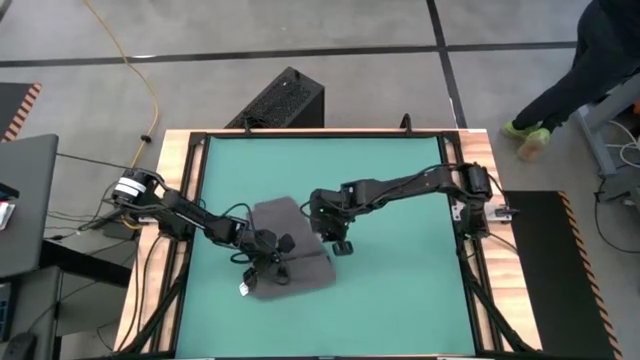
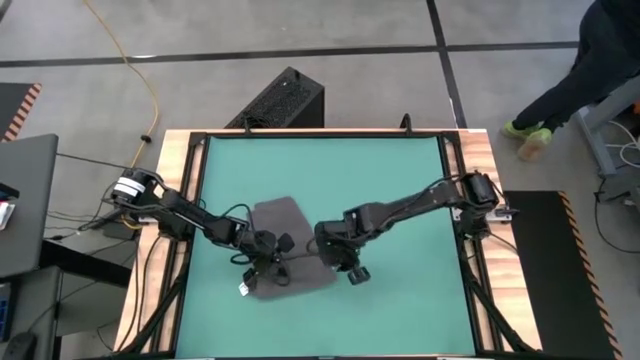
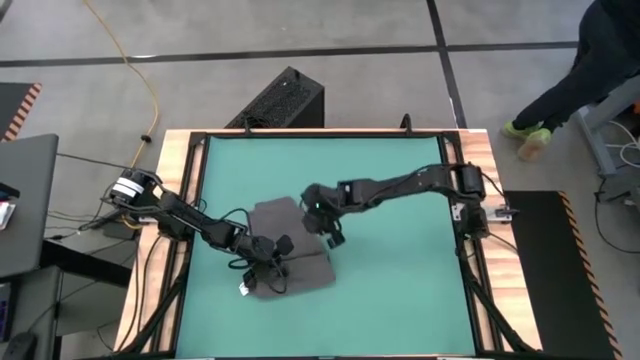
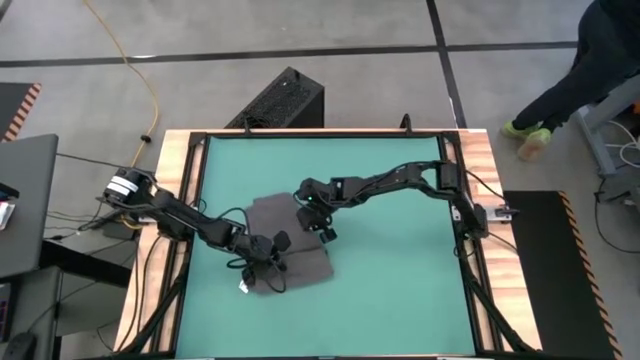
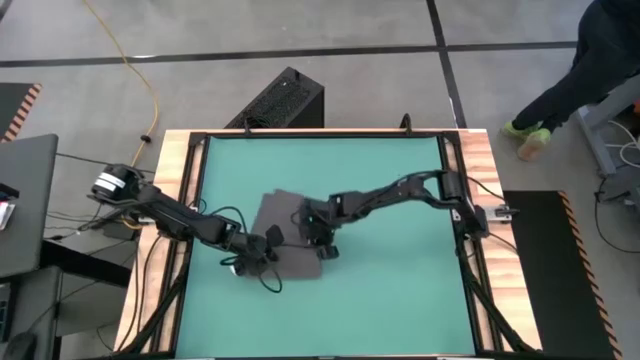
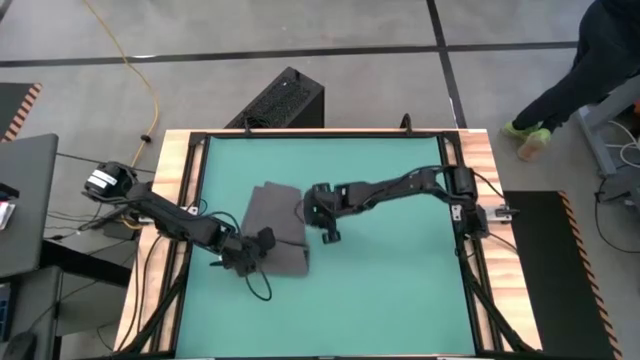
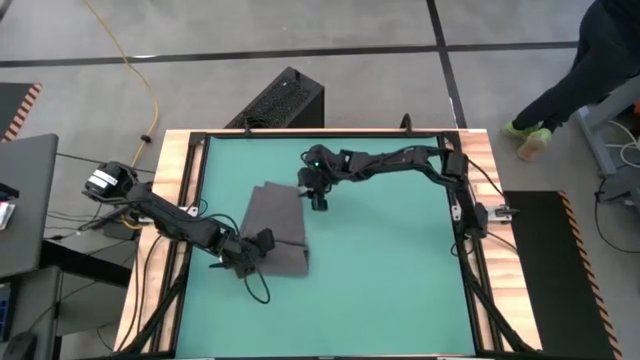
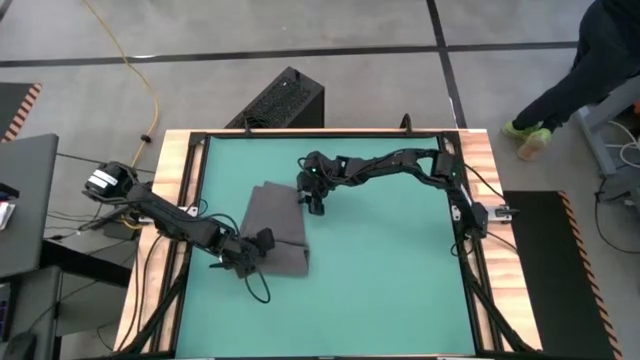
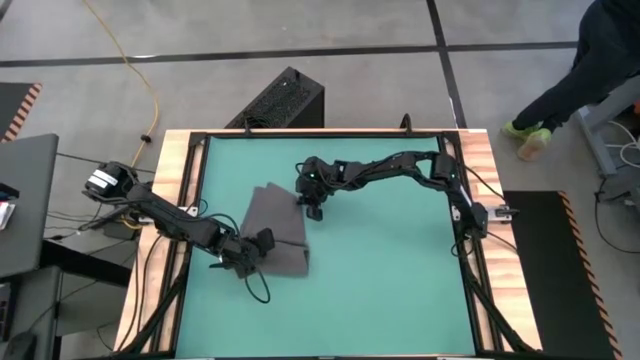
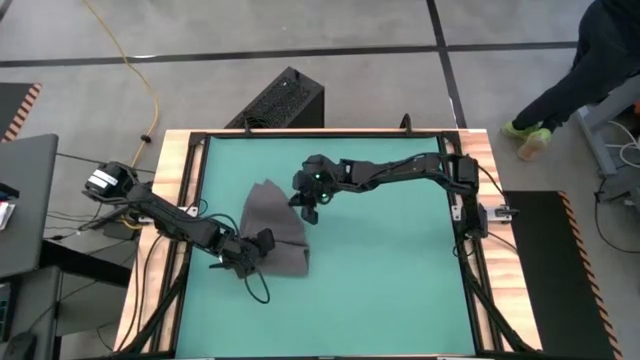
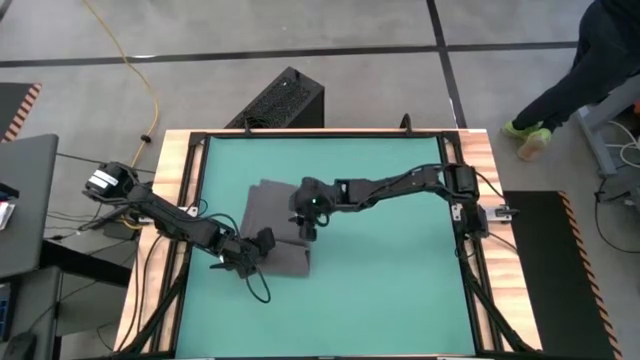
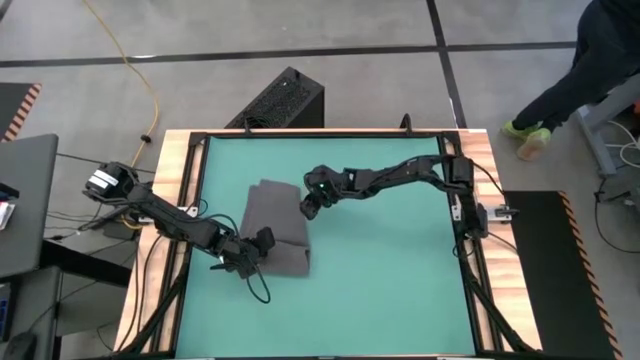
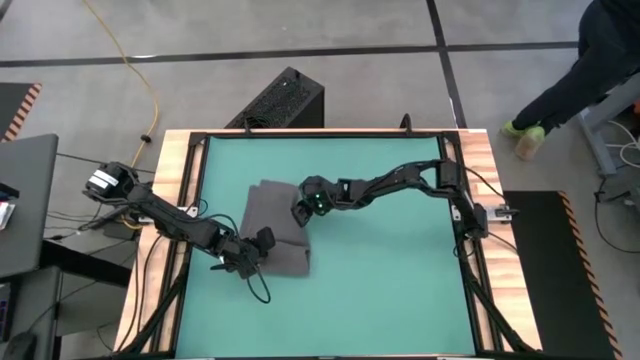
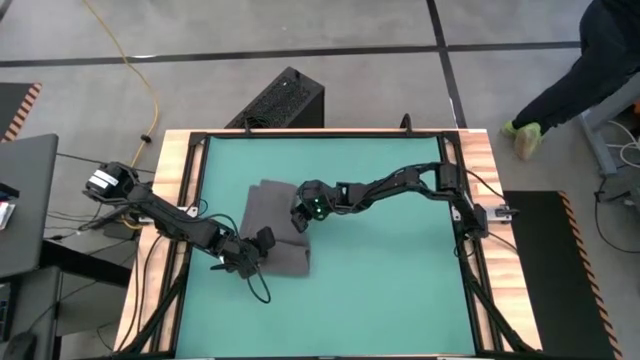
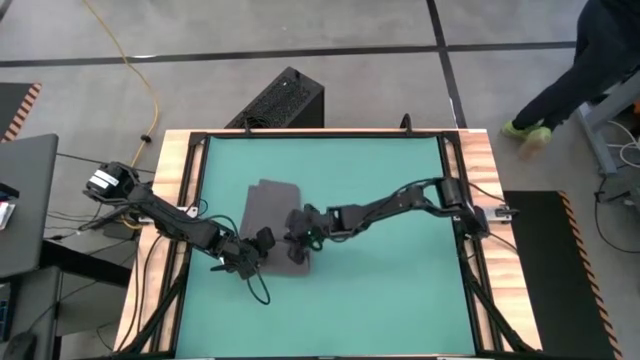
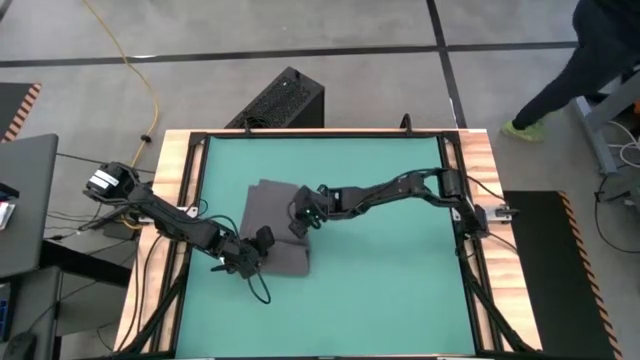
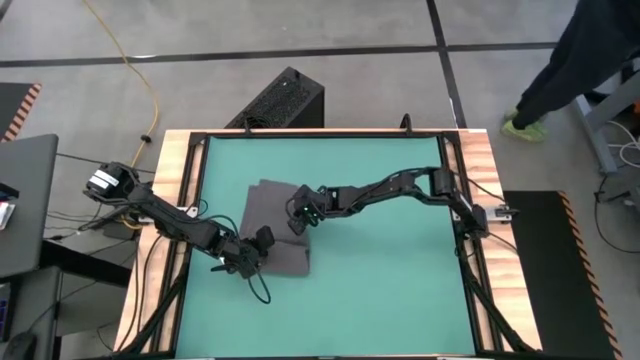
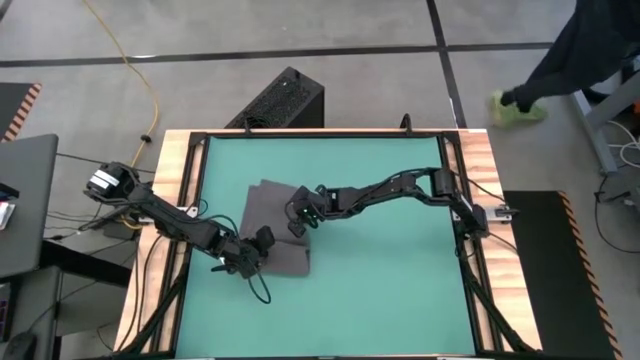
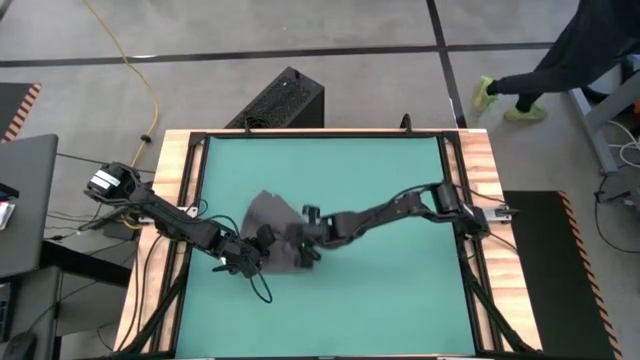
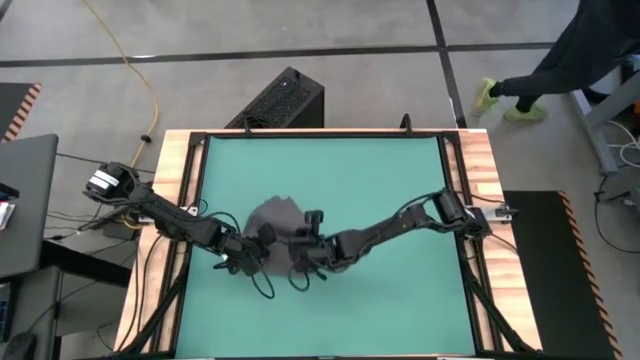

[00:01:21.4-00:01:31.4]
Task: Roll towel into tight, uniform cylinder
Roll the gray towel

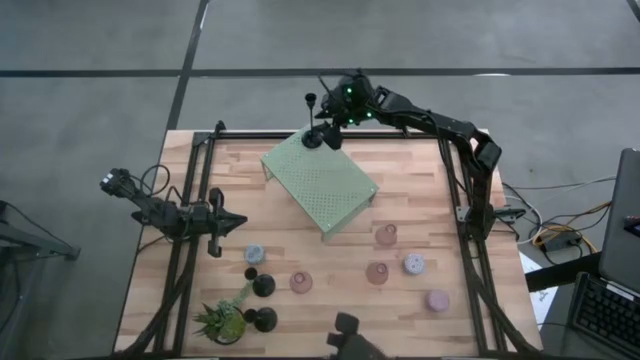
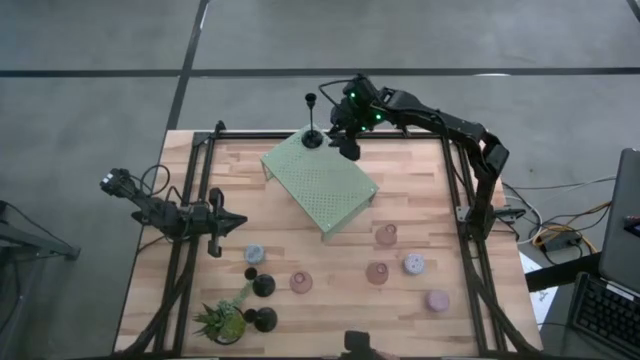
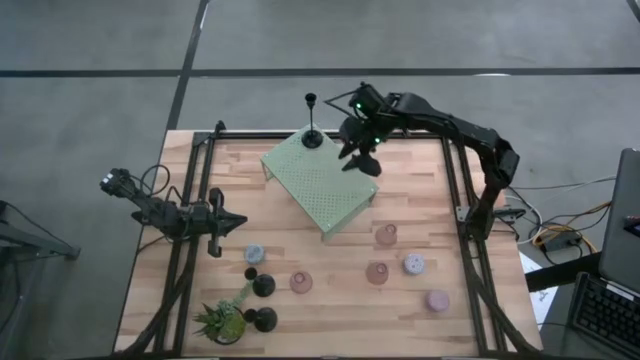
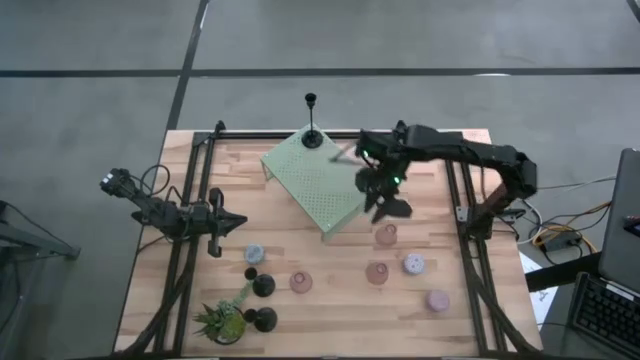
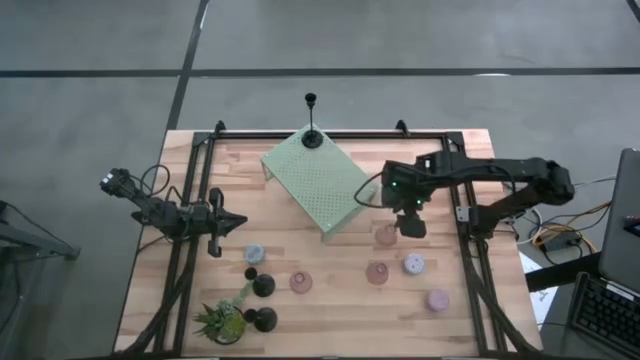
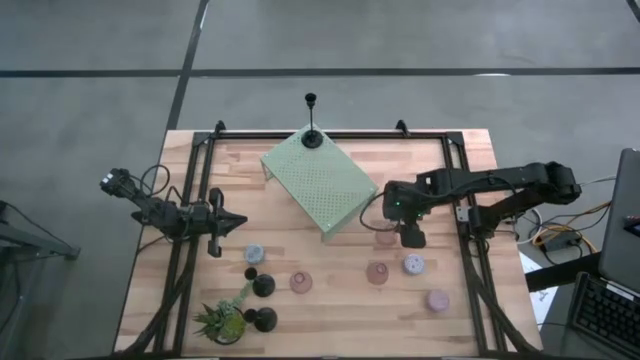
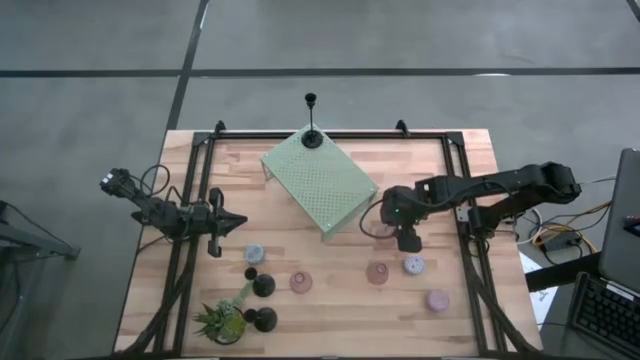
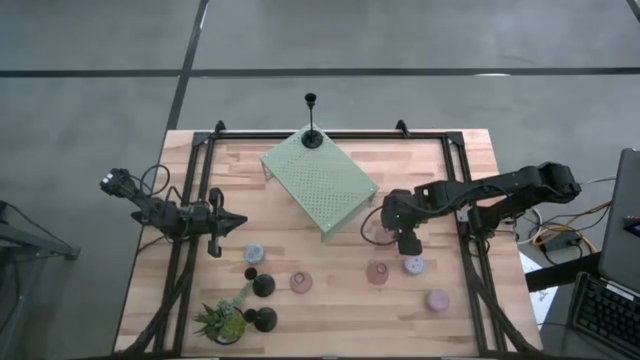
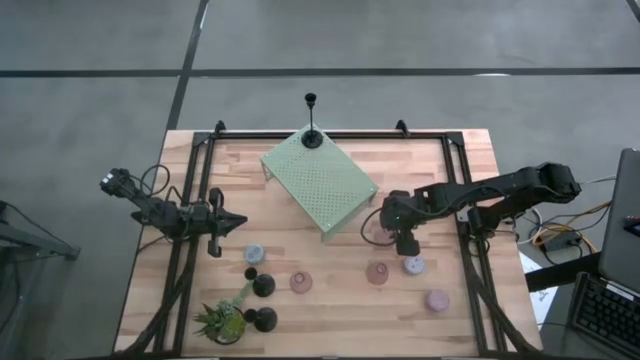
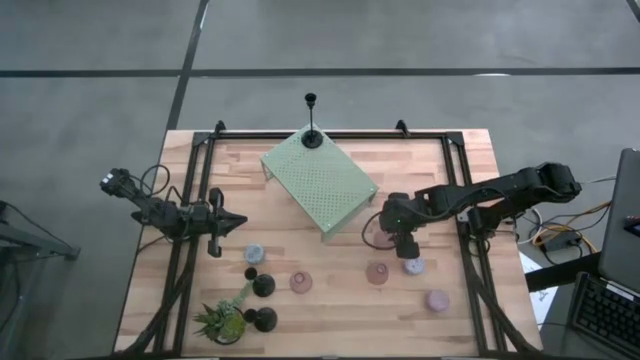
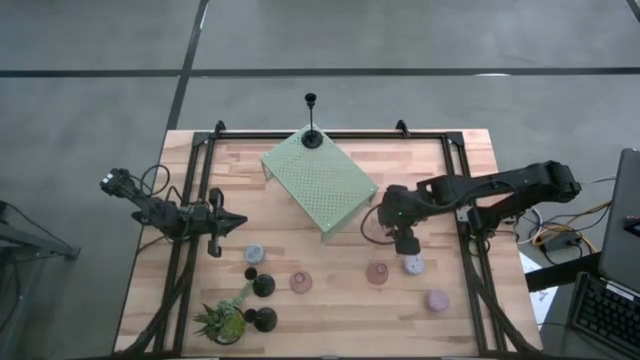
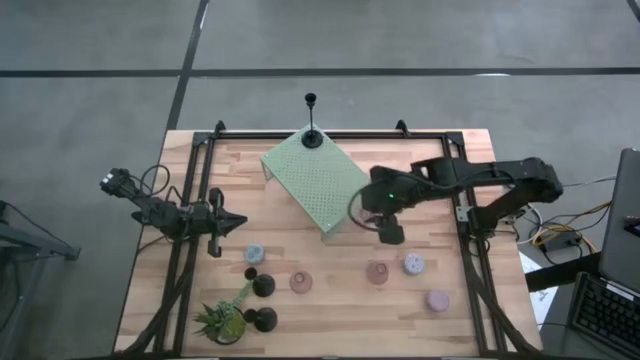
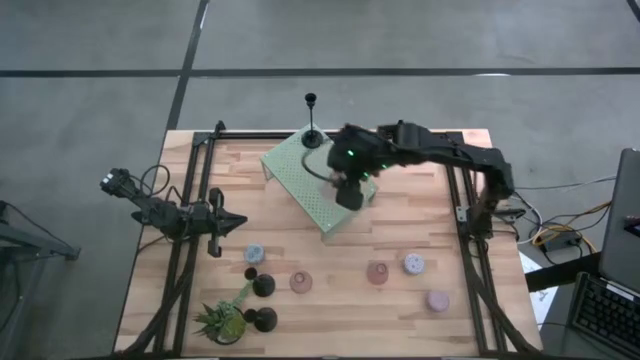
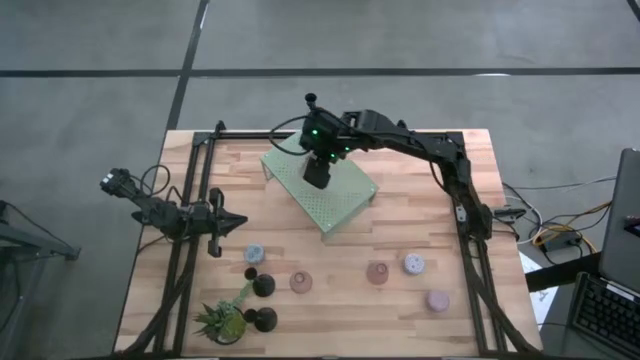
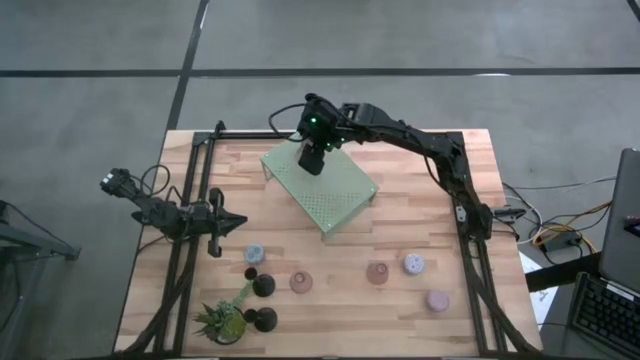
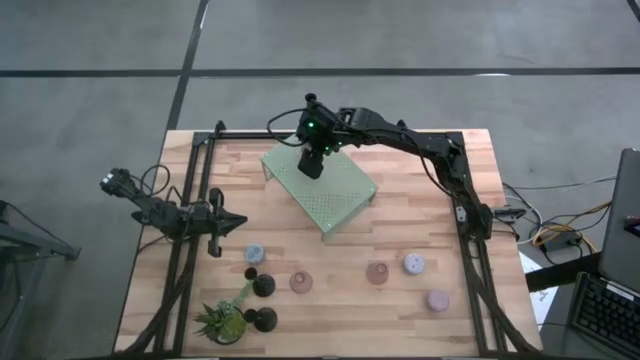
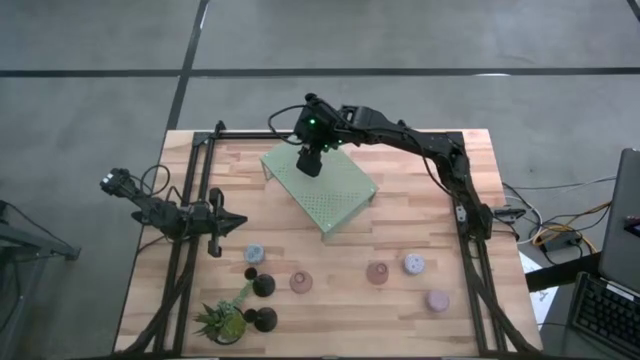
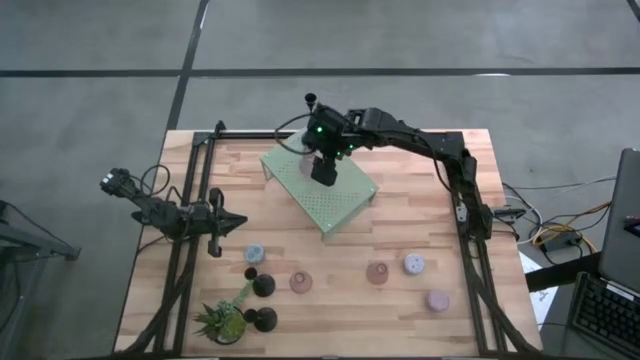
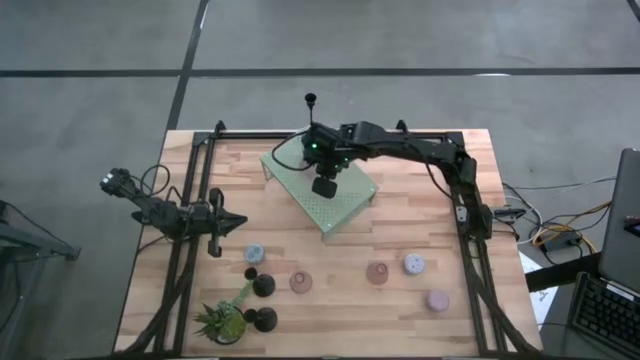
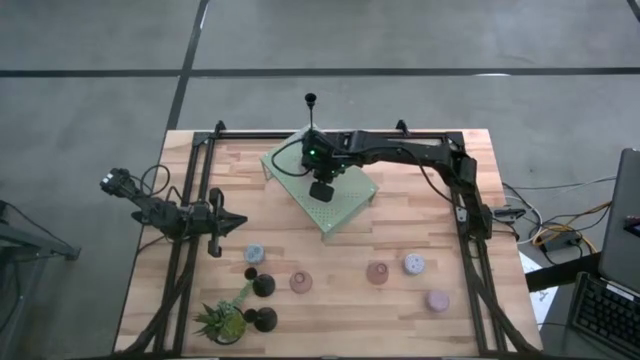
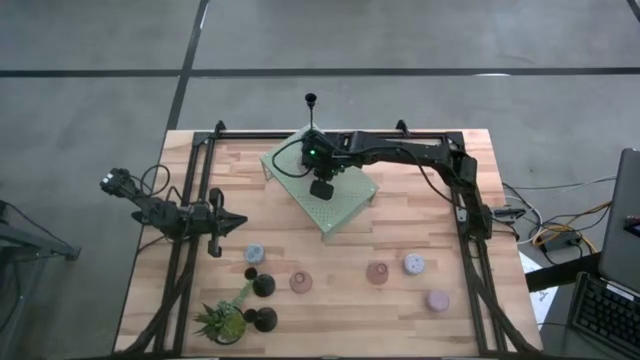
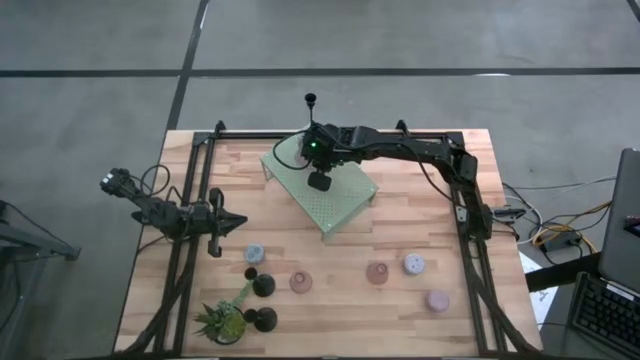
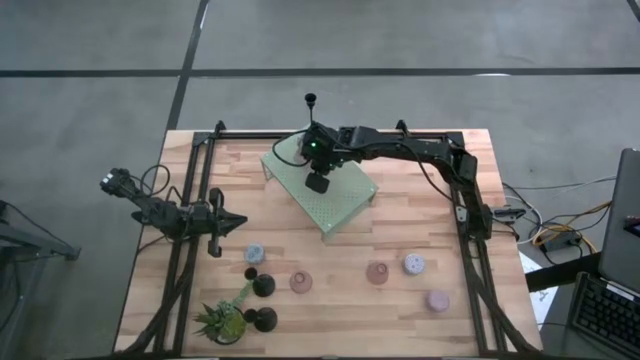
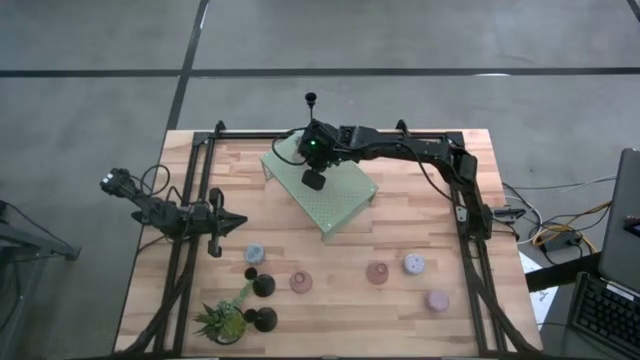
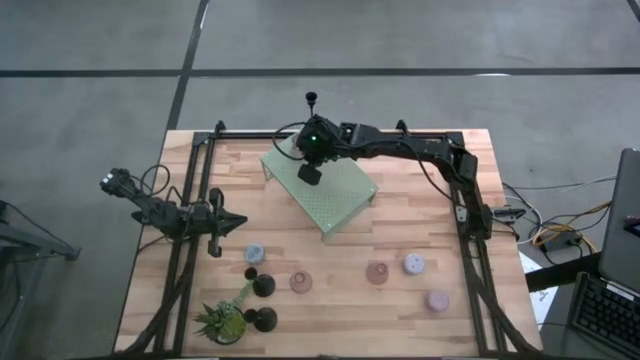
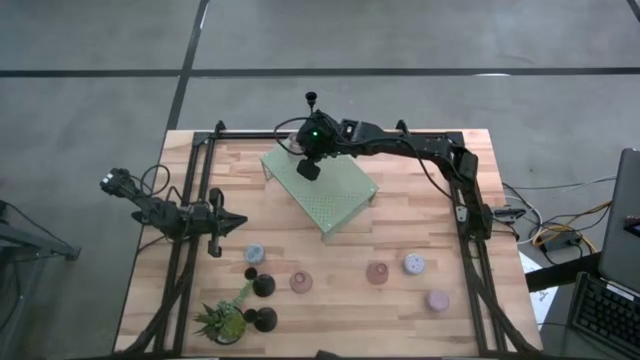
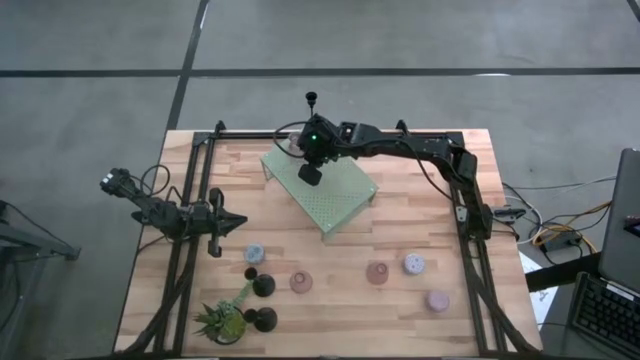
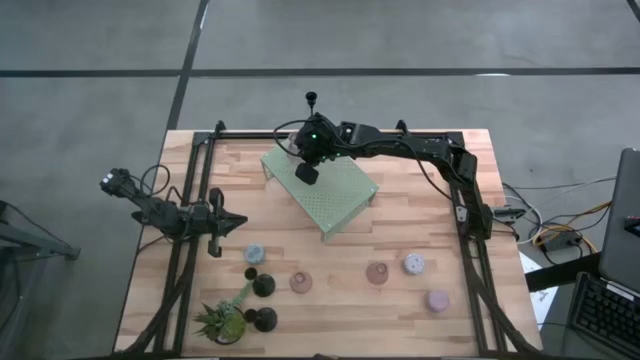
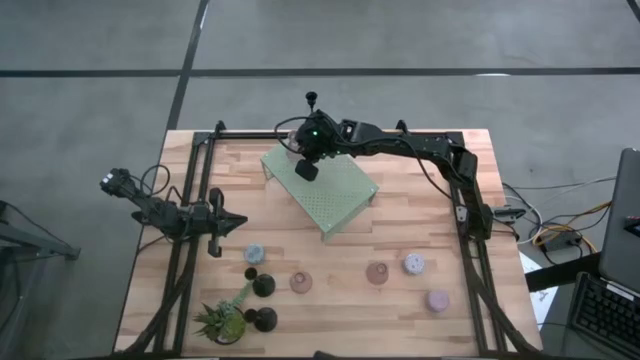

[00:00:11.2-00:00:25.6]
Task: Pick & Place candle stick holders
Put the top pink glass candle holder on the shelf aligned with the black candle holder
